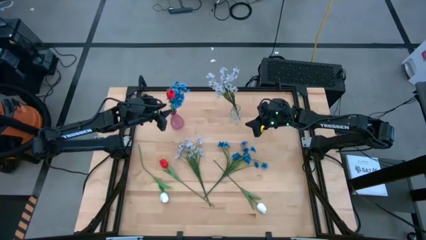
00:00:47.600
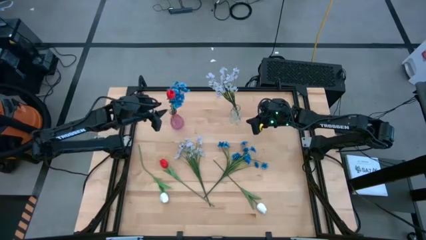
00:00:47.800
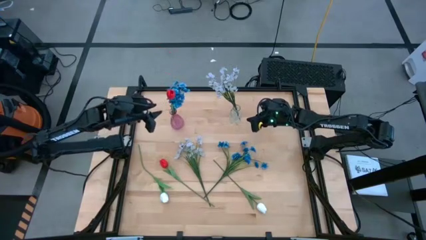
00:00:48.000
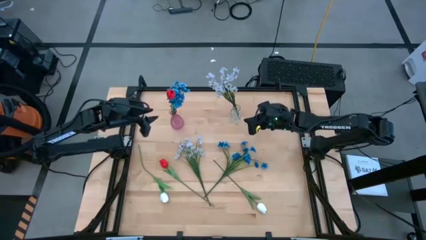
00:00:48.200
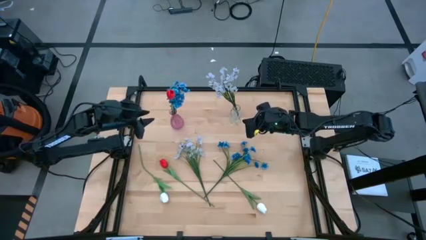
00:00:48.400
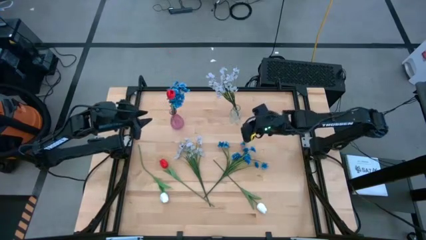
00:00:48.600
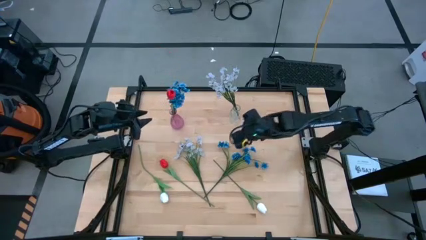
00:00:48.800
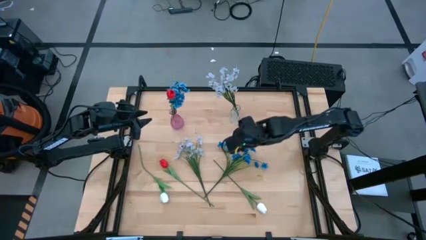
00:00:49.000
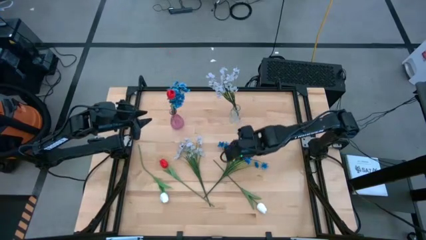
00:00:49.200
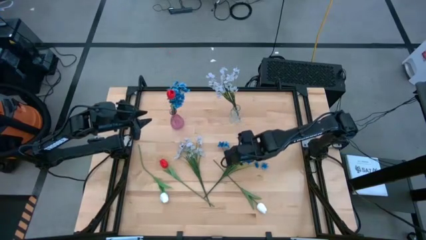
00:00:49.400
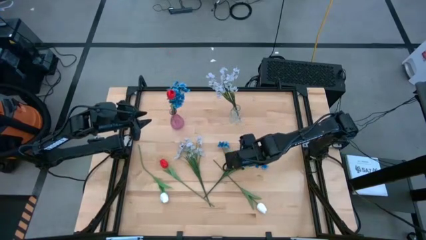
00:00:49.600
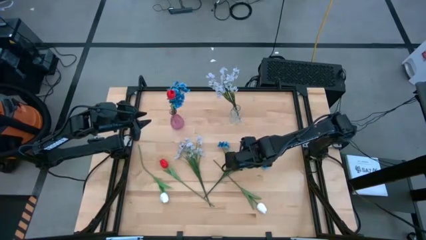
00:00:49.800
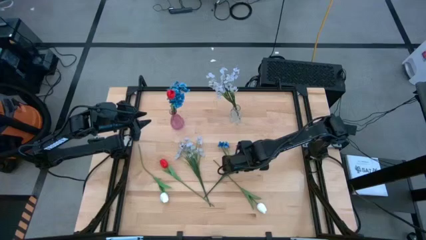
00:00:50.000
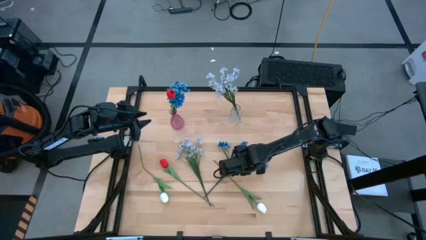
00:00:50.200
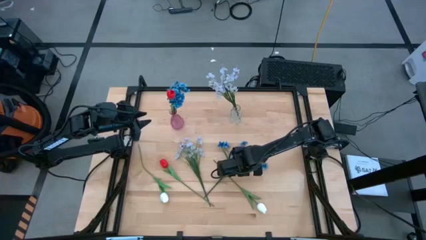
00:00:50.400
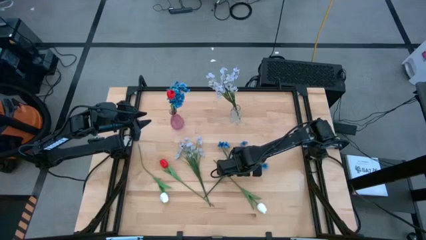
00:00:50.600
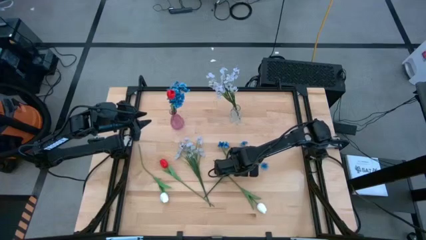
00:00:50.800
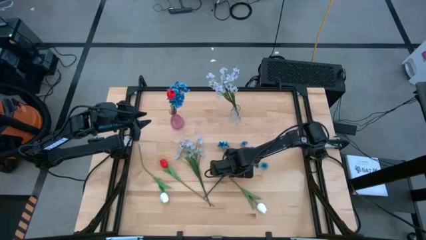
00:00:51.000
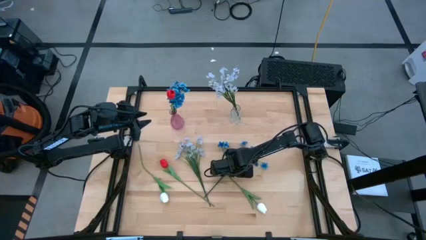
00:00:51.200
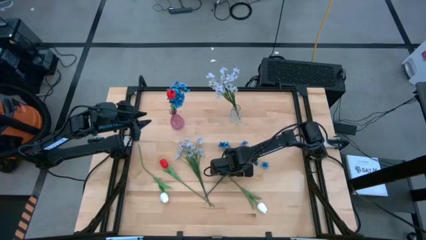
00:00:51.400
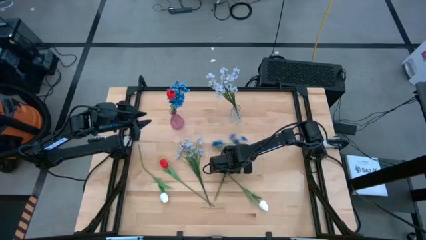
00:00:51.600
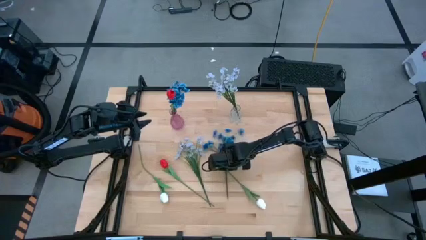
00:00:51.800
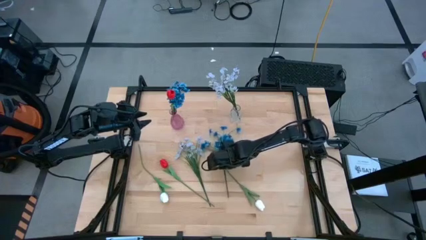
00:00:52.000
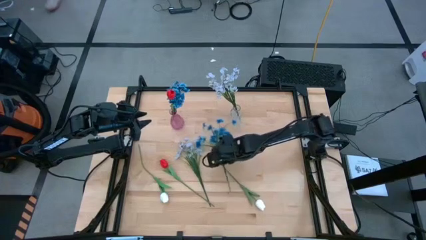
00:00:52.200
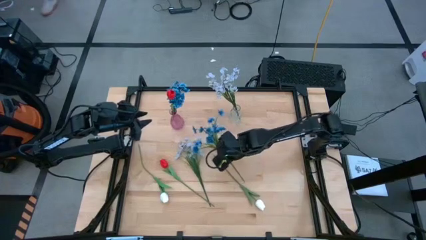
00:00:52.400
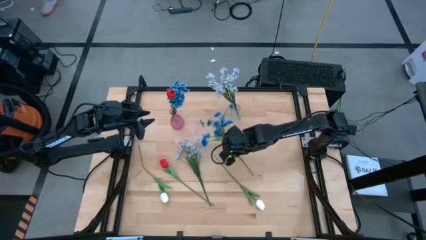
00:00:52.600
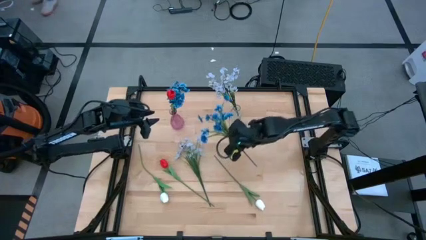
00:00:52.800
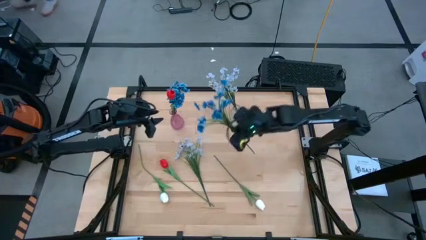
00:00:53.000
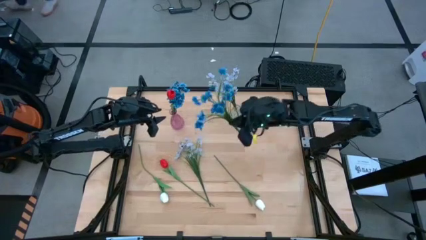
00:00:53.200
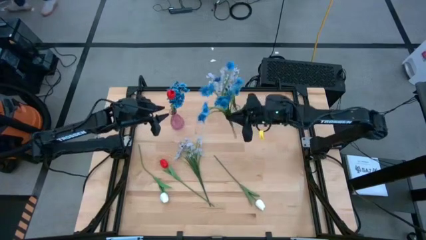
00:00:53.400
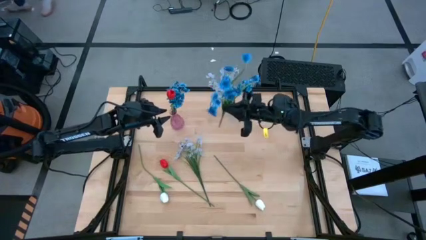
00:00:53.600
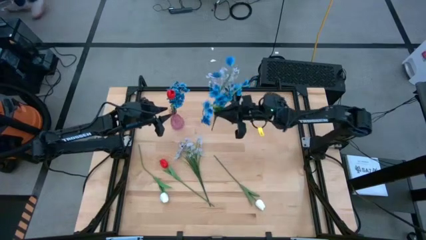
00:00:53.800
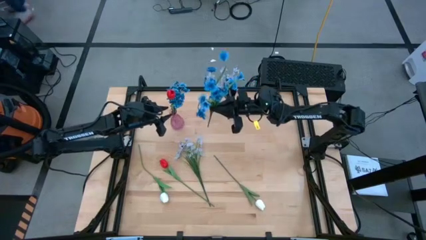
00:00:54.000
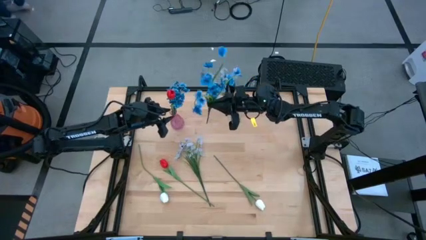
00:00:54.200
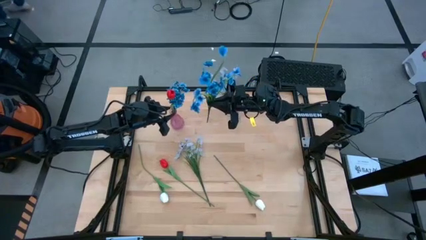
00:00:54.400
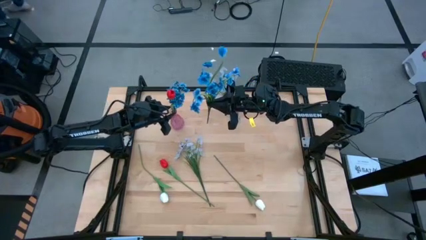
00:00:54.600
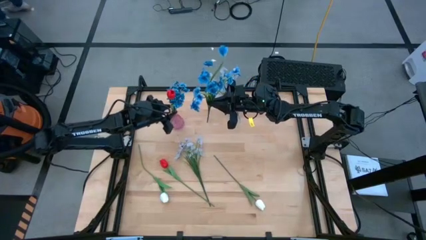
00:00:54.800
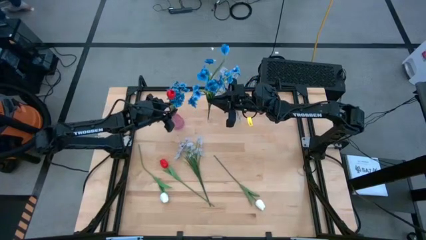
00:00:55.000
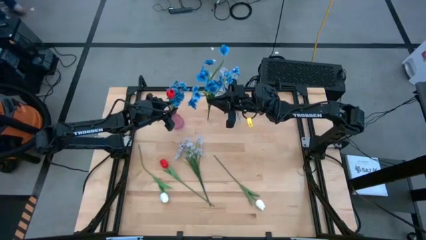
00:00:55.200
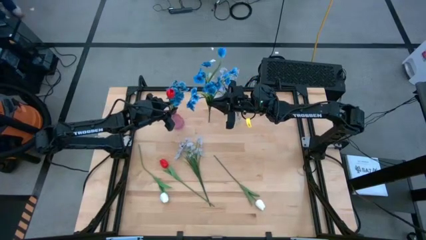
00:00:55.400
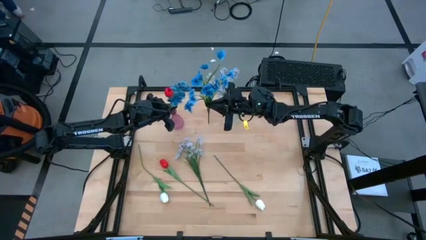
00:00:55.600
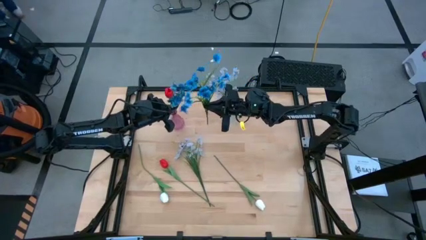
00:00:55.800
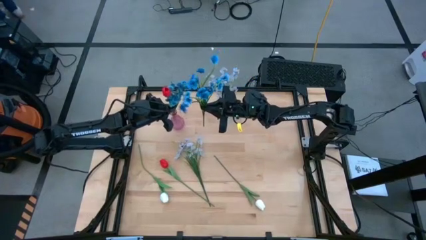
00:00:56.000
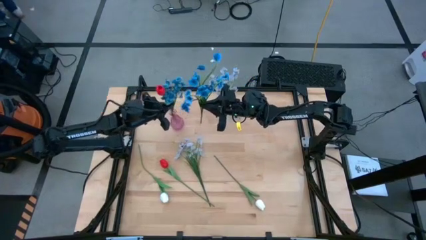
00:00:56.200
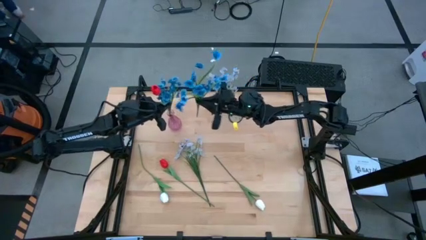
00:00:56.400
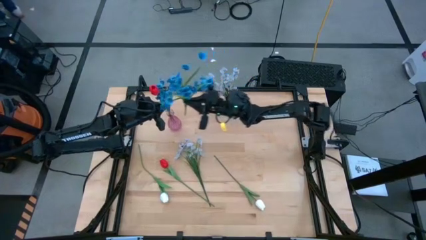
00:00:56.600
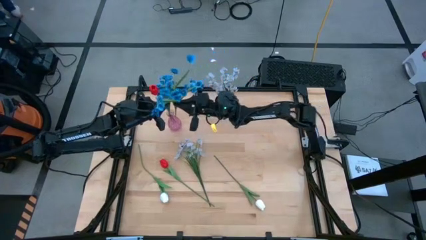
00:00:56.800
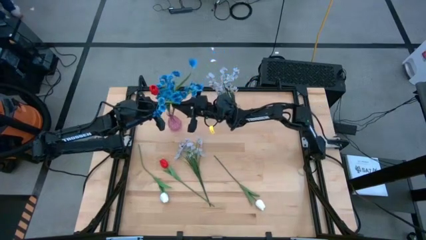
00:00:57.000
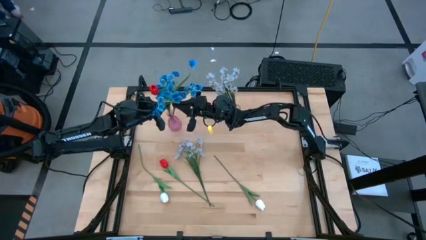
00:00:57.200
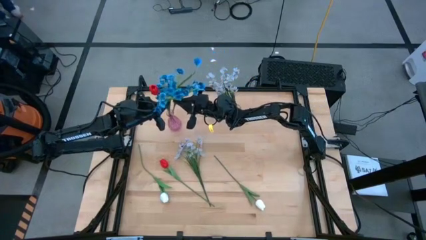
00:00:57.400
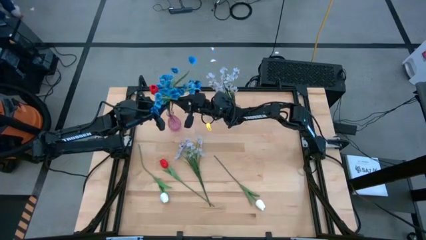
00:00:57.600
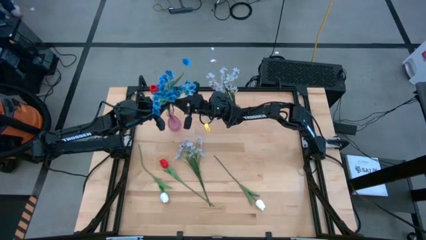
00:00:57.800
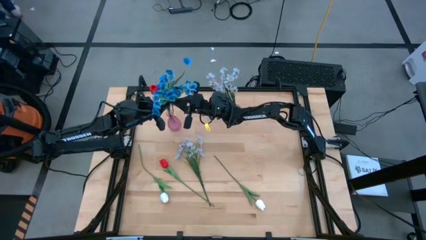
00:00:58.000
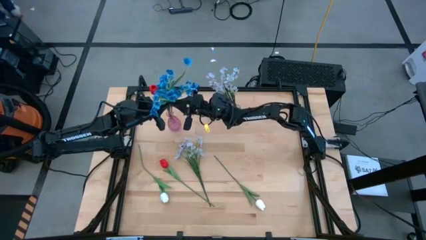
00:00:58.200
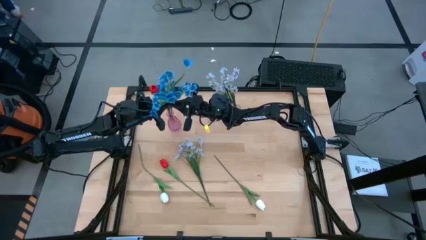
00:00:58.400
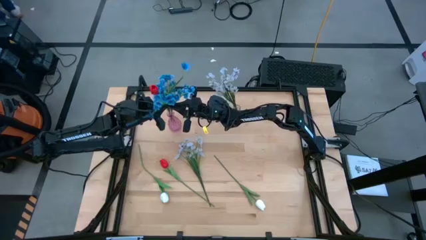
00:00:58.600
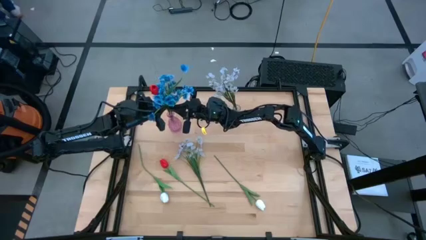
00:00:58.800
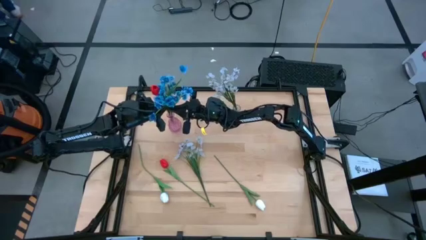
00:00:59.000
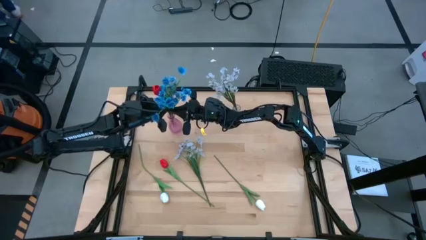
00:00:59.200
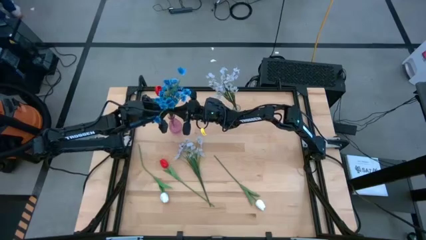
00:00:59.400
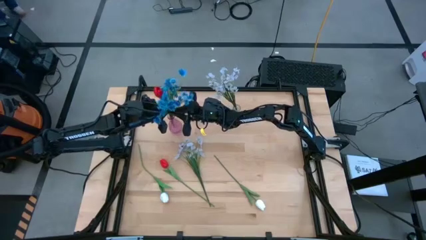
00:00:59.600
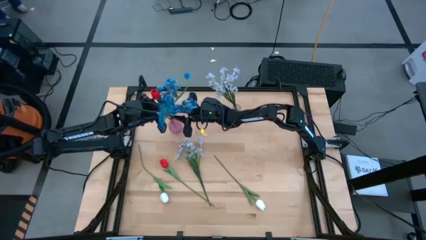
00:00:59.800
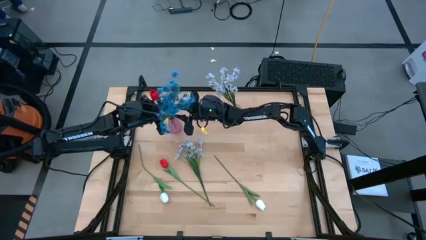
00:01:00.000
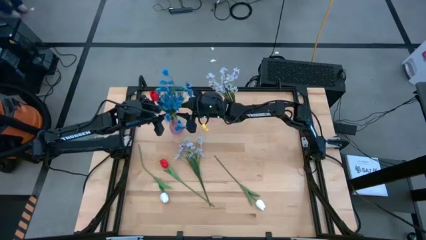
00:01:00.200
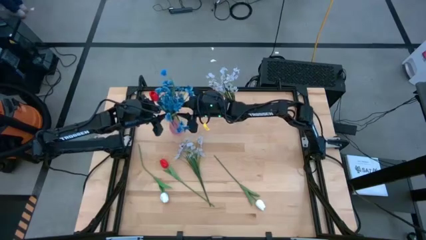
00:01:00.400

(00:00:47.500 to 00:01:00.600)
Task: Sort flowers into vase by color
Put the blue flowers into the pink vase
